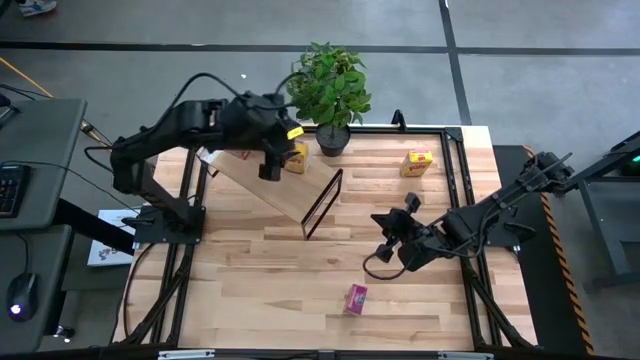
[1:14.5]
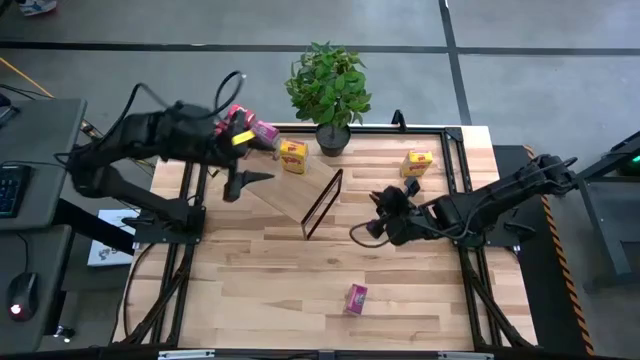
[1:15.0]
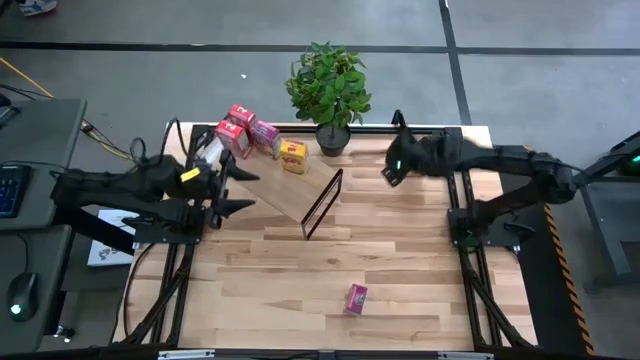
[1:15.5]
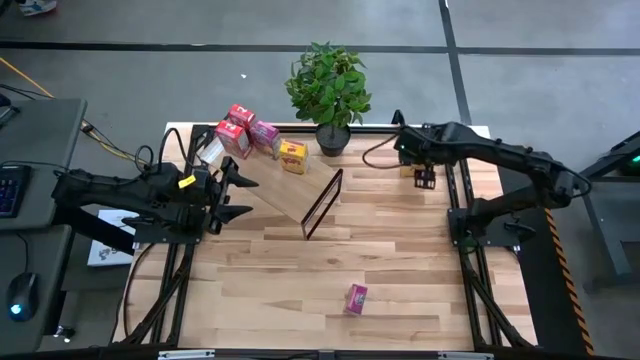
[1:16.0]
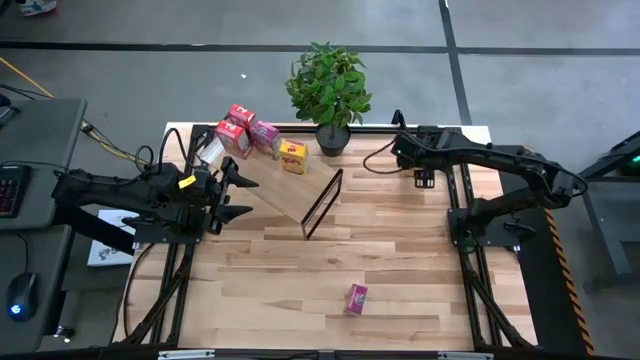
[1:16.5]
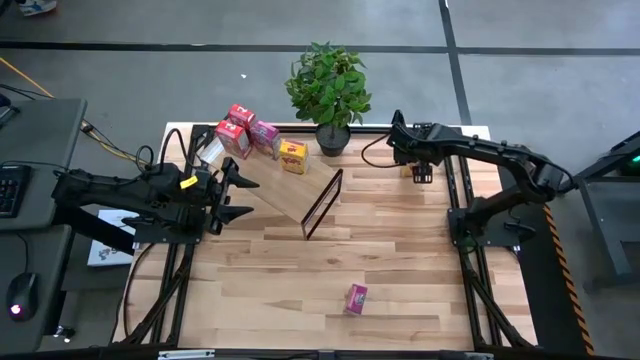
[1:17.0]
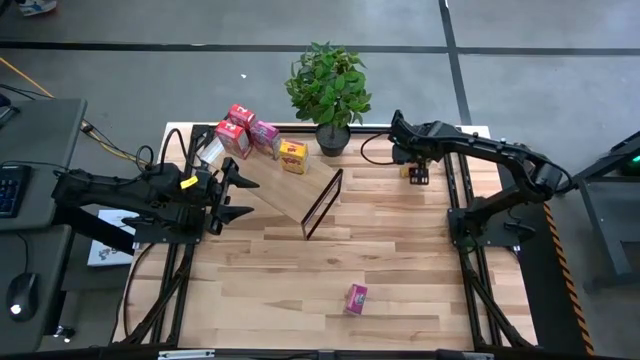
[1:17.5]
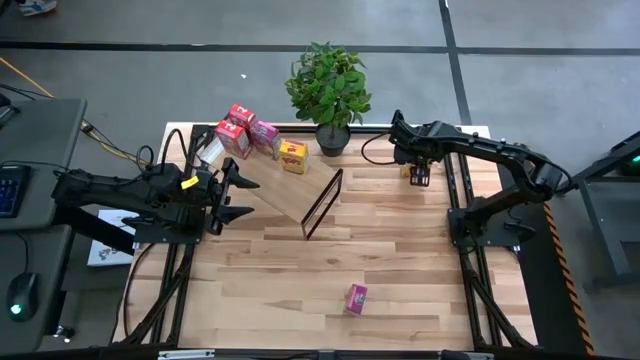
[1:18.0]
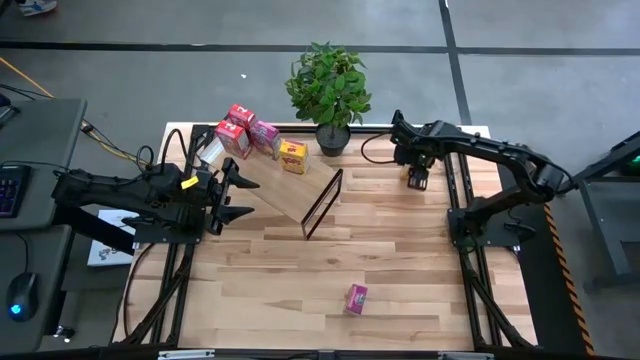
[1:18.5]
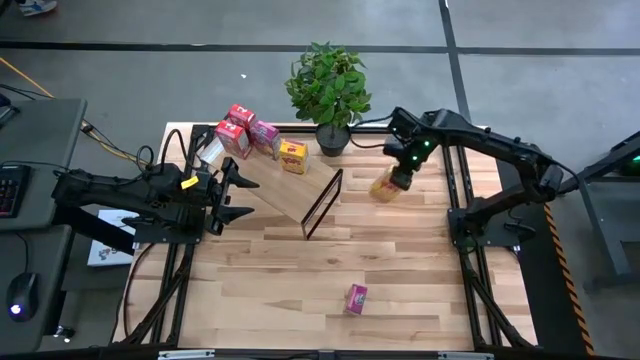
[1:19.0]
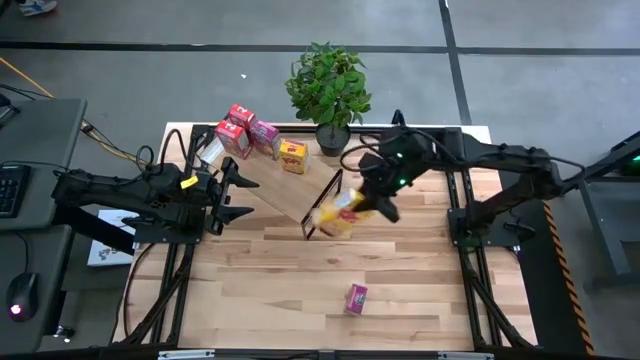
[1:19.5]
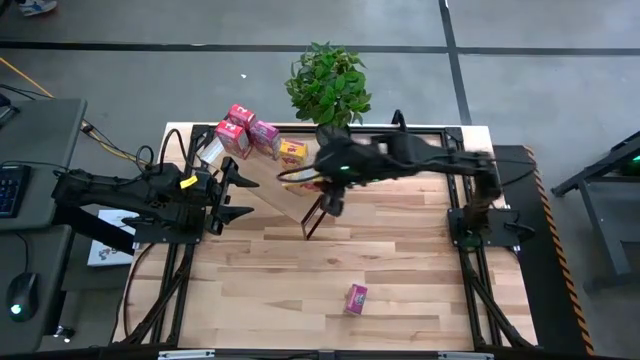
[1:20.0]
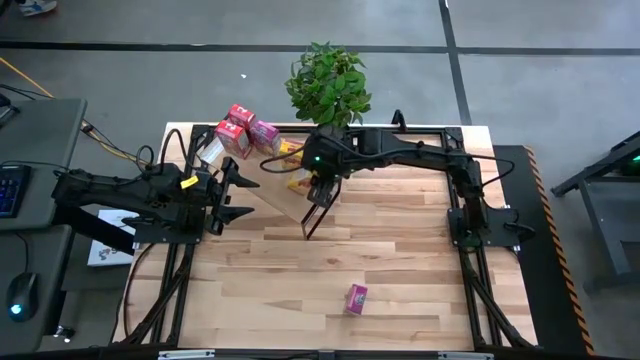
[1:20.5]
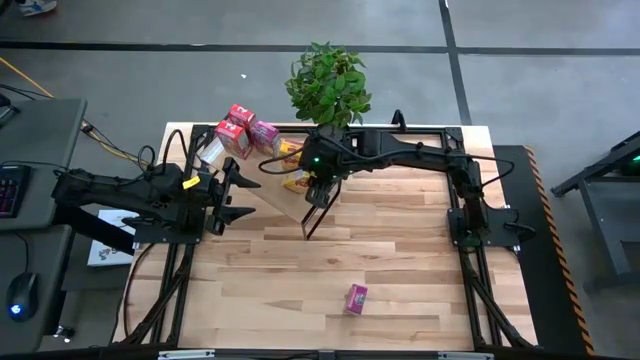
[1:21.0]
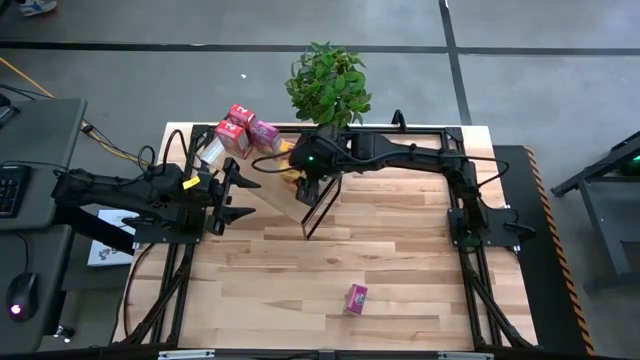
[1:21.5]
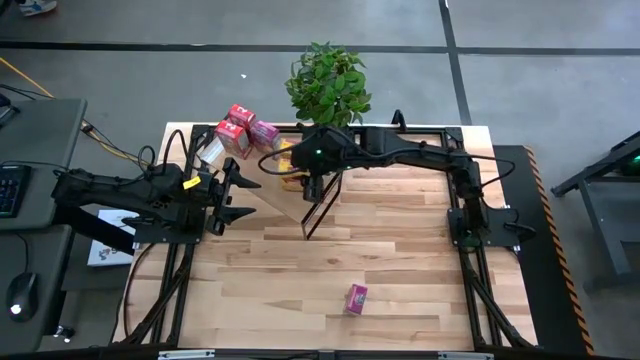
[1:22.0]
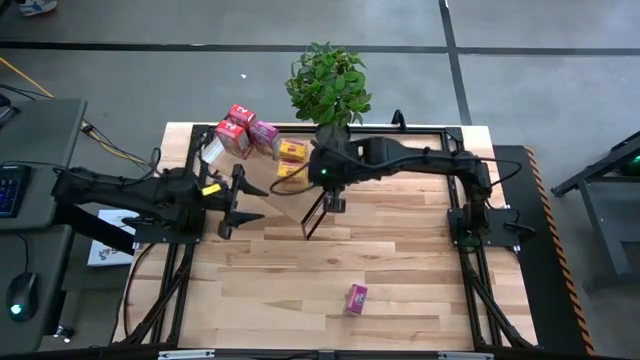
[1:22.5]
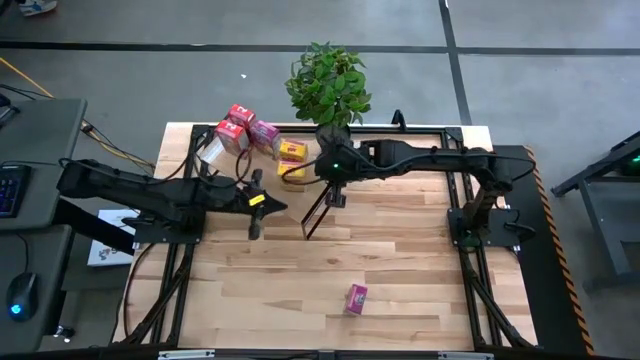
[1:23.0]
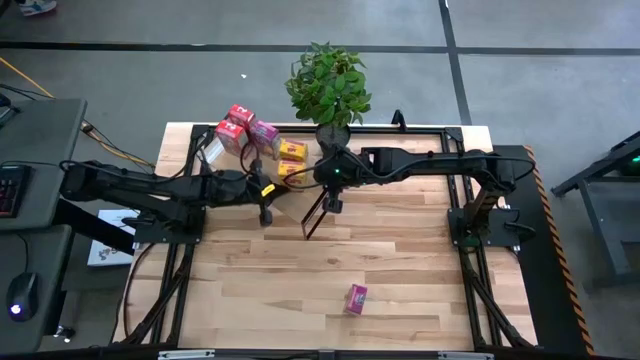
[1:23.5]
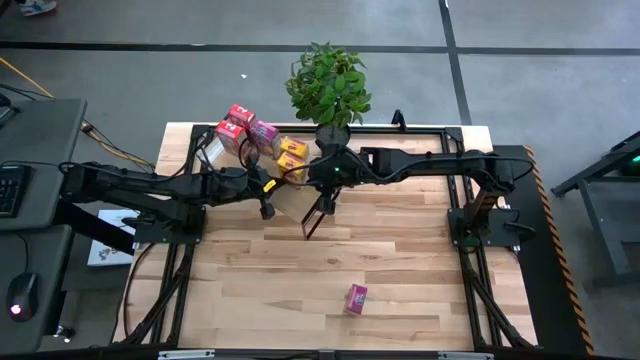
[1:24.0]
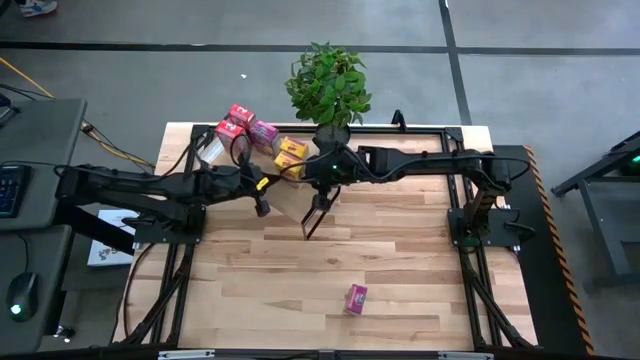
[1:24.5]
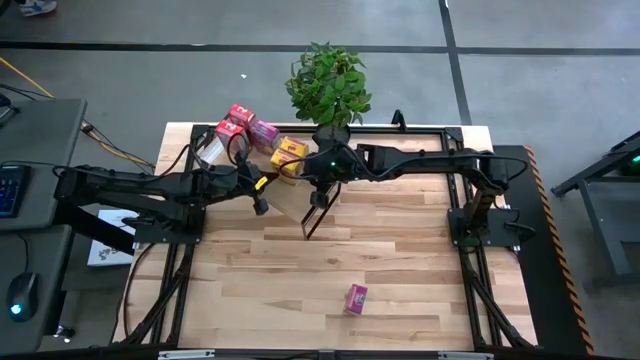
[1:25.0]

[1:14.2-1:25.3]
Task: Stack cereal on shelf
Put the yellow cereal box on the shelf aligned with the other yellow cereal box

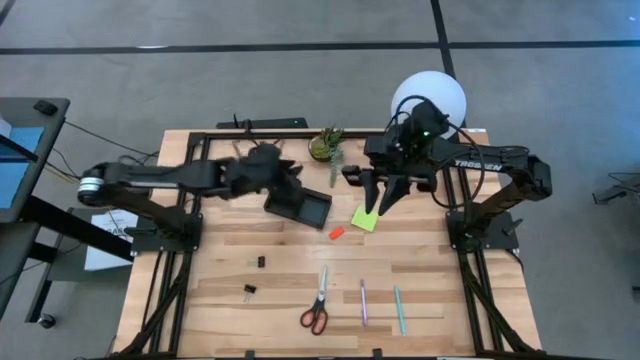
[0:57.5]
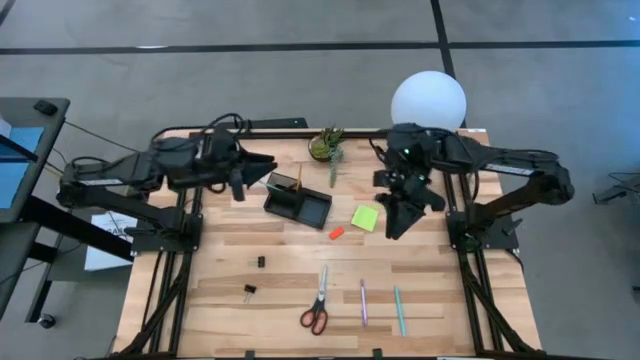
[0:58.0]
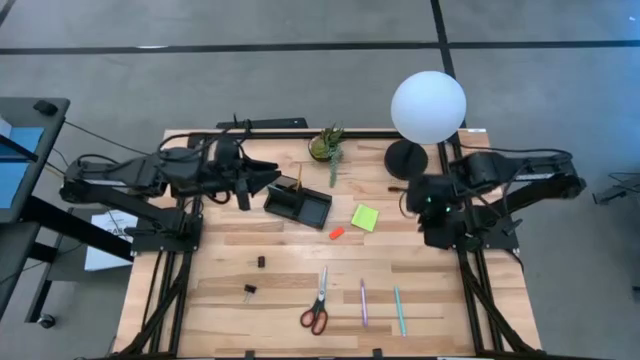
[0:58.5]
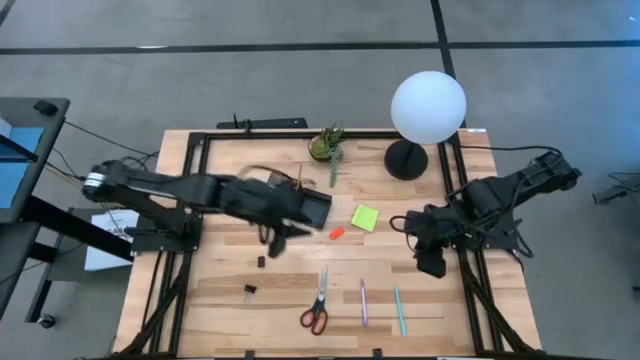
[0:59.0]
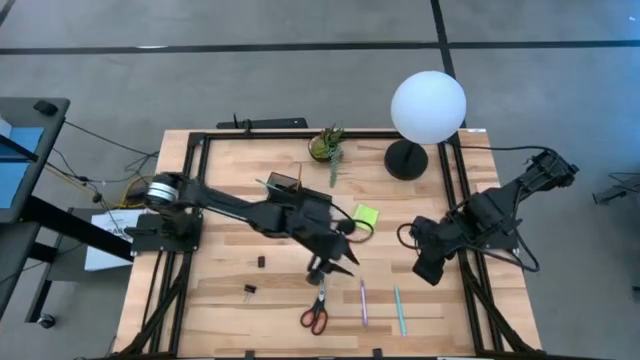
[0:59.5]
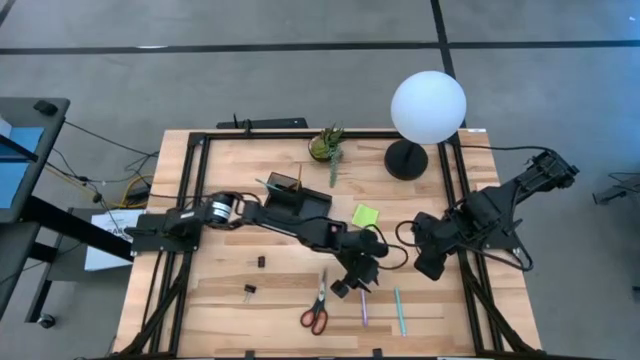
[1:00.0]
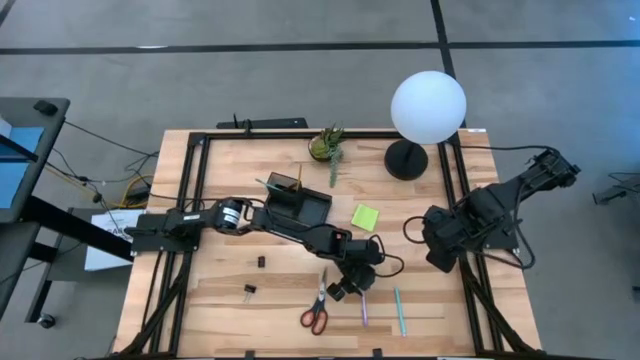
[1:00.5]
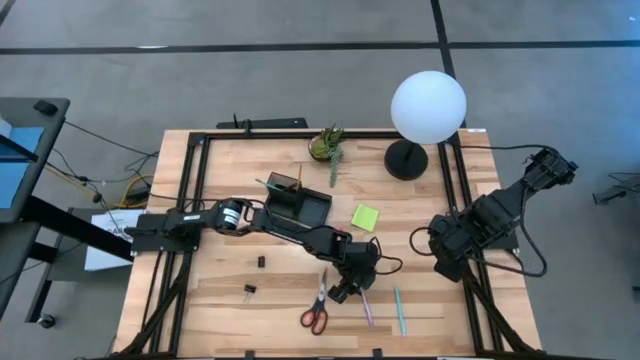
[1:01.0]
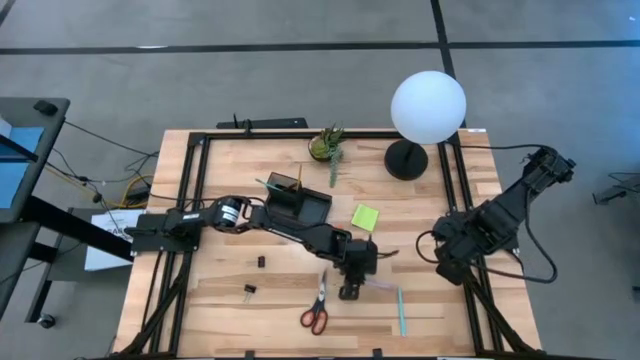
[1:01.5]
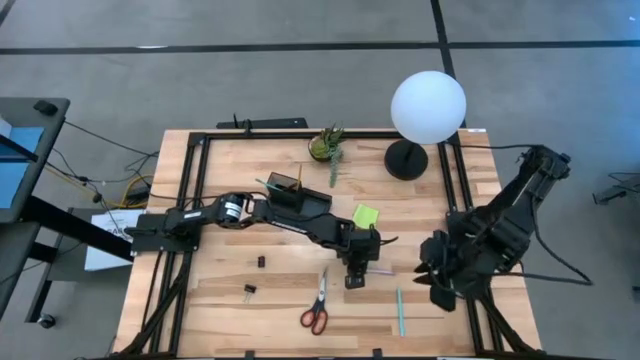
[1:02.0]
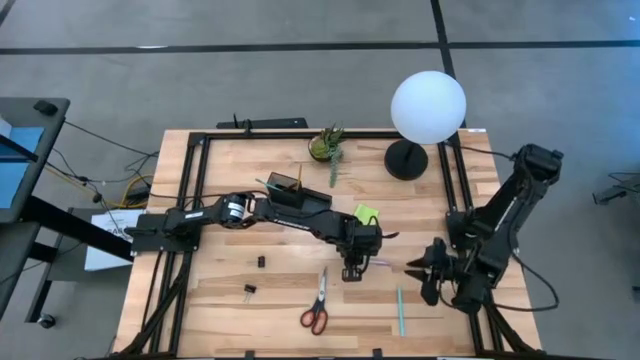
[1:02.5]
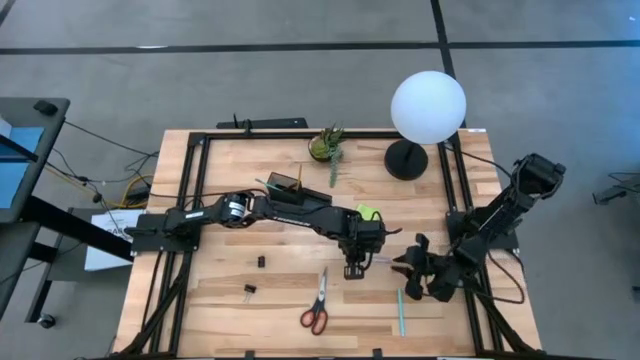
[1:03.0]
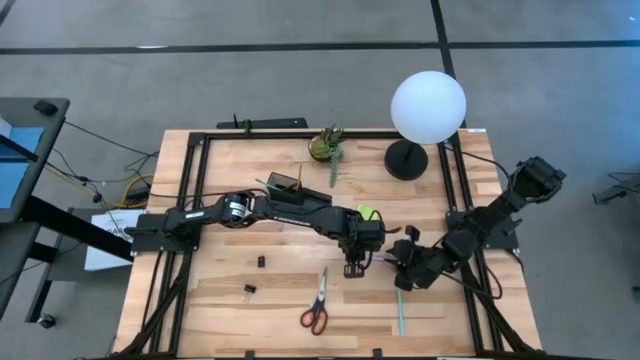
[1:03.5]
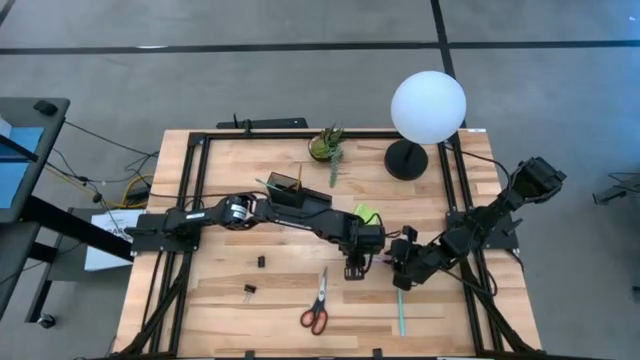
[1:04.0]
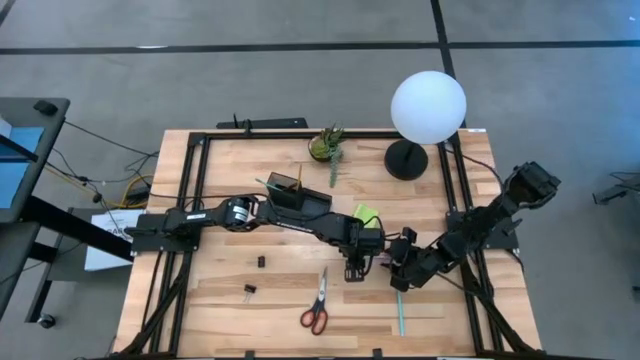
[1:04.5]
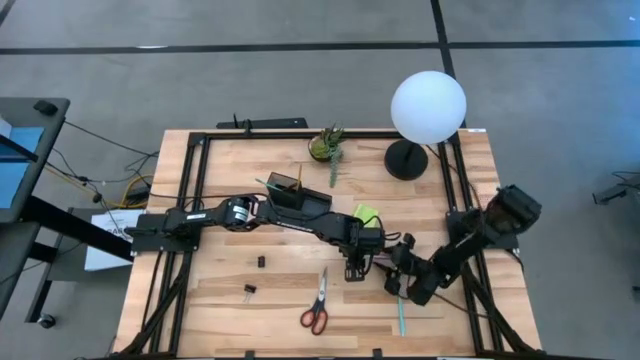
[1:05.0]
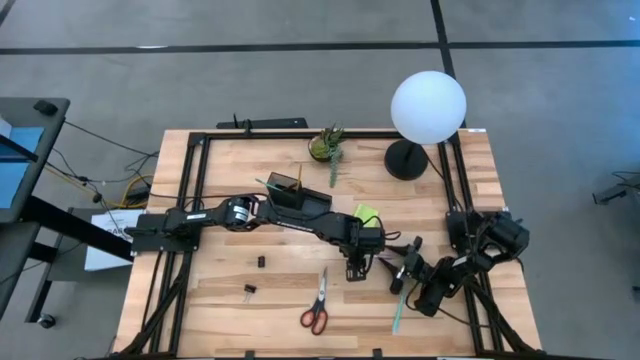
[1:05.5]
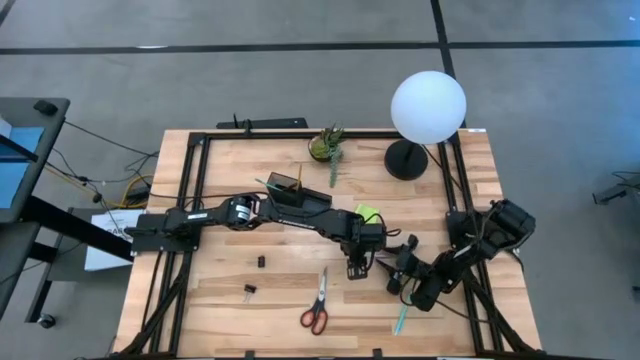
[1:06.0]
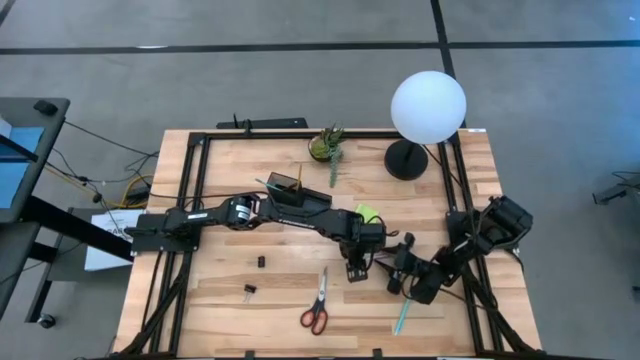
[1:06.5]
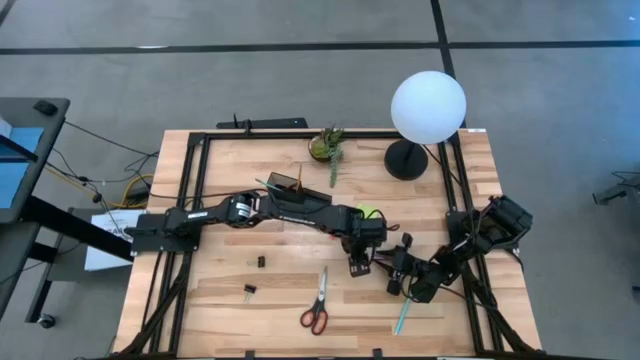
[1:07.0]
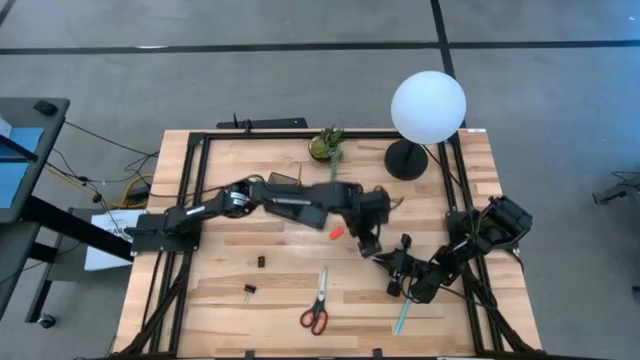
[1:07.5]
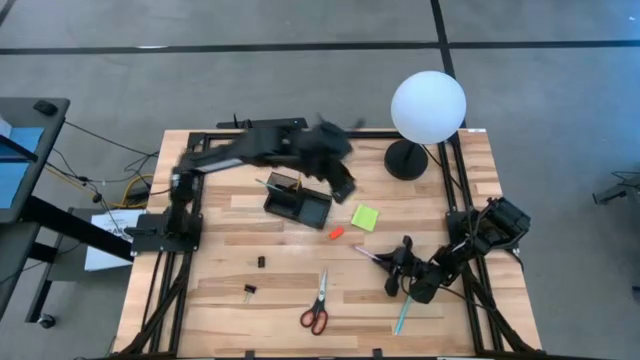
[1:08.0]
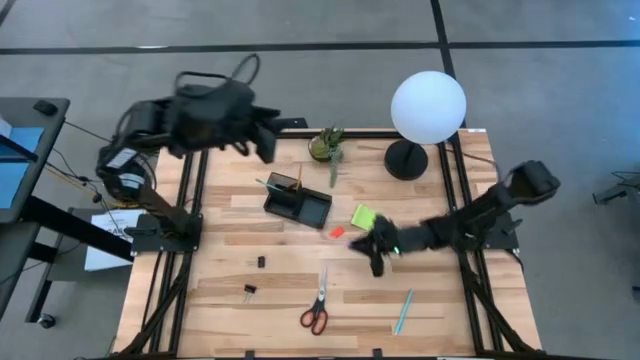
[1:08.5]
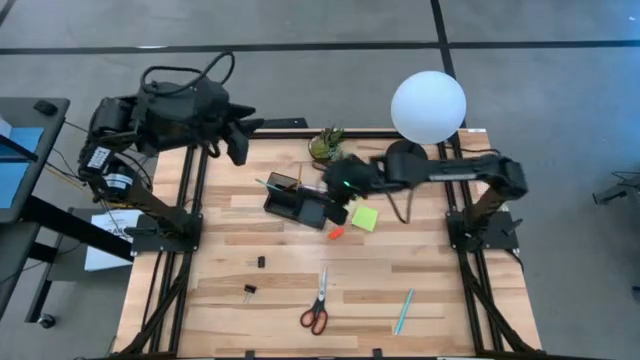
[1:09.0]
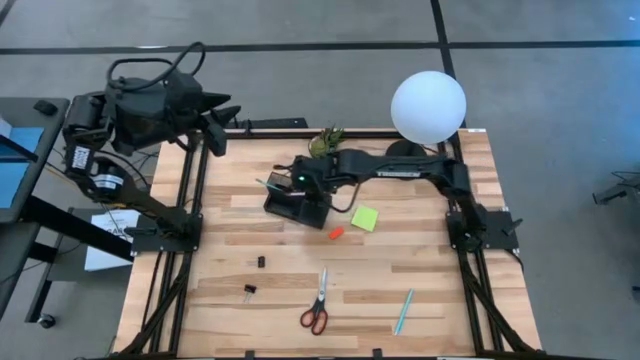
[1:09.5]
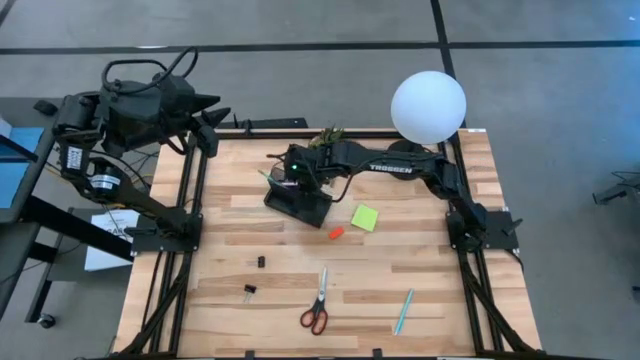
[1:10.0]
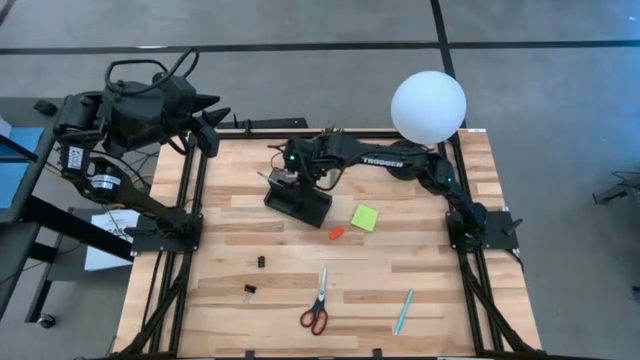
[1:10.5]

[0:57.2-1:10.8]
Task: Pick and place office supplies into organizer
Put the violet pen into the black desk organizer
